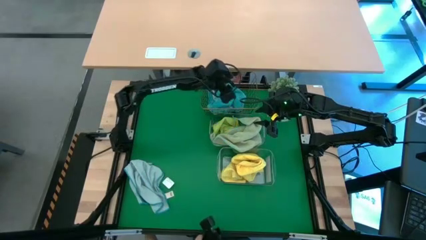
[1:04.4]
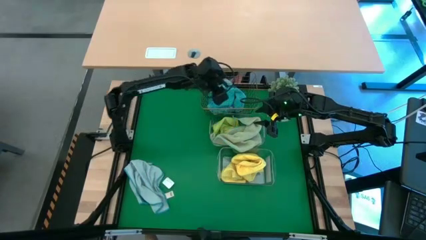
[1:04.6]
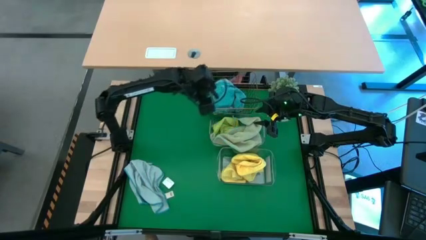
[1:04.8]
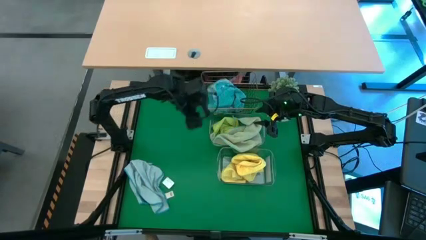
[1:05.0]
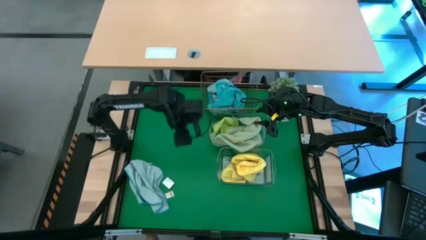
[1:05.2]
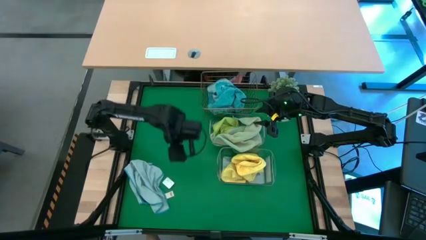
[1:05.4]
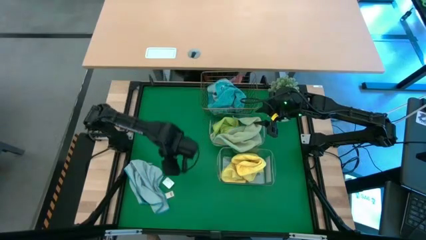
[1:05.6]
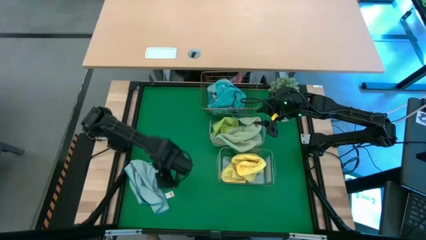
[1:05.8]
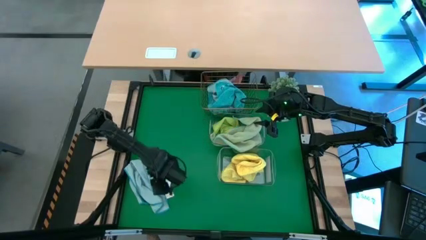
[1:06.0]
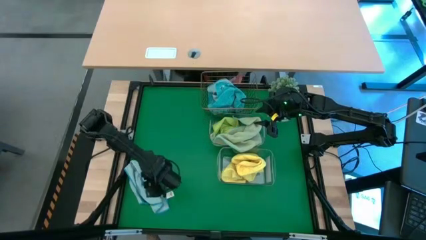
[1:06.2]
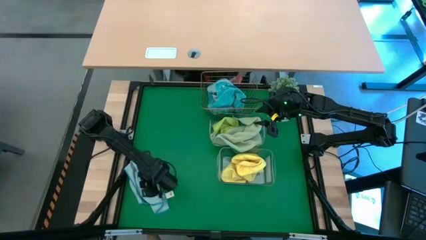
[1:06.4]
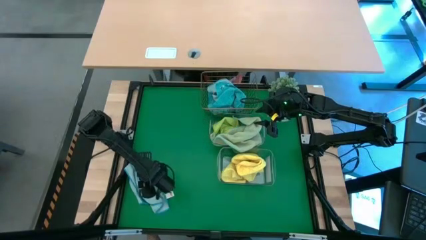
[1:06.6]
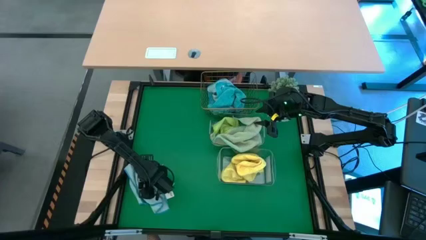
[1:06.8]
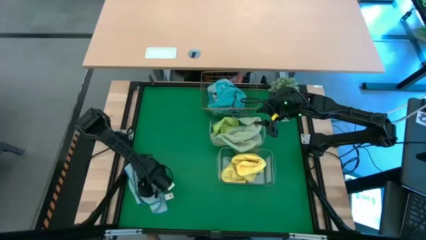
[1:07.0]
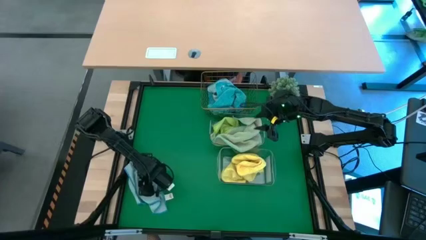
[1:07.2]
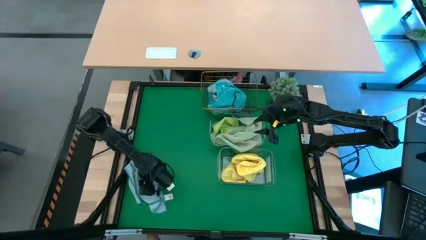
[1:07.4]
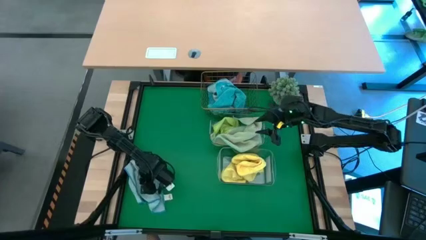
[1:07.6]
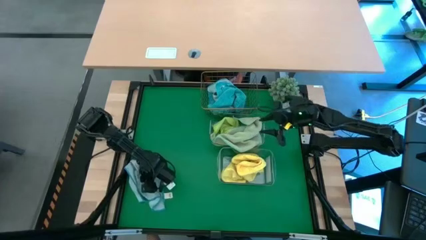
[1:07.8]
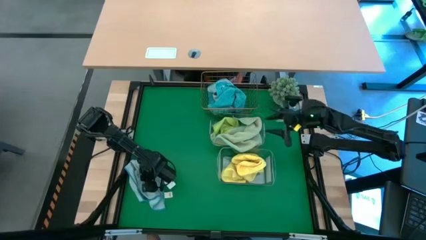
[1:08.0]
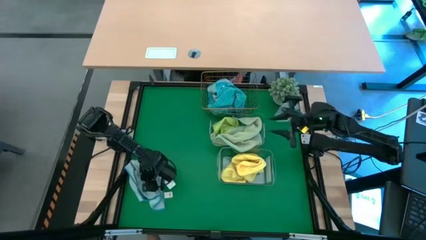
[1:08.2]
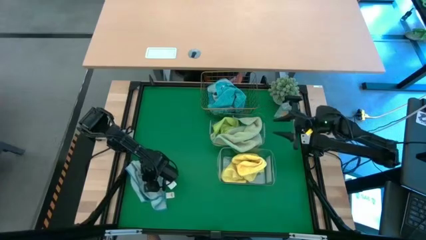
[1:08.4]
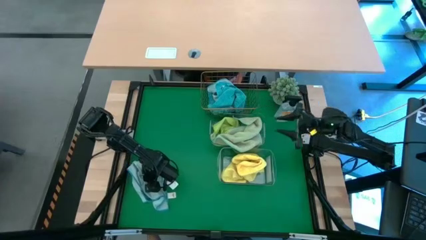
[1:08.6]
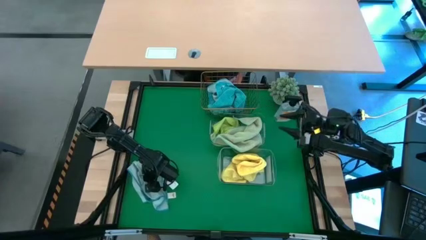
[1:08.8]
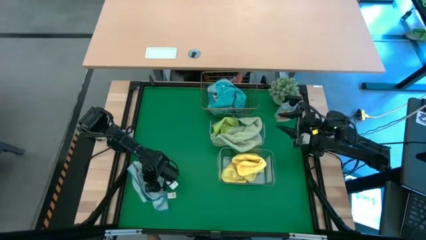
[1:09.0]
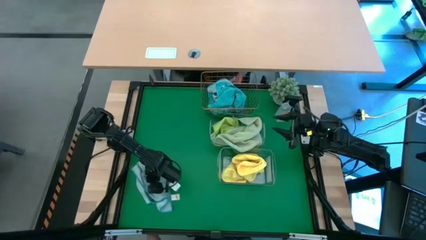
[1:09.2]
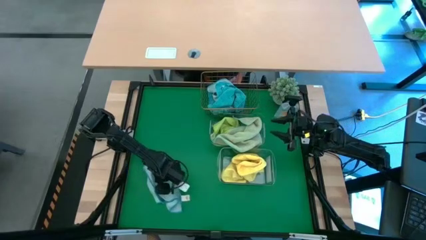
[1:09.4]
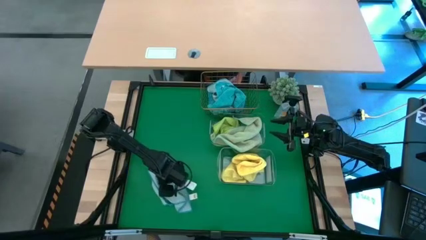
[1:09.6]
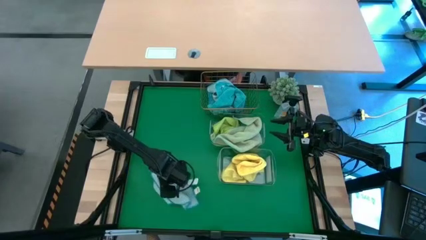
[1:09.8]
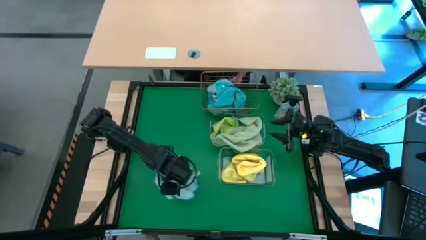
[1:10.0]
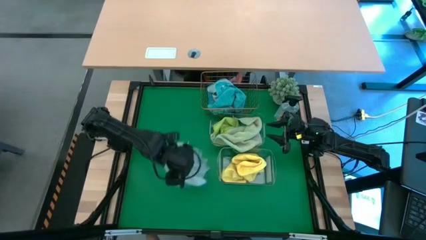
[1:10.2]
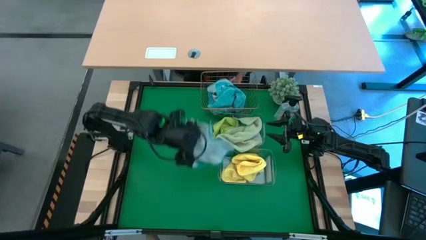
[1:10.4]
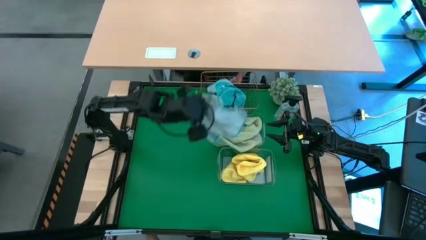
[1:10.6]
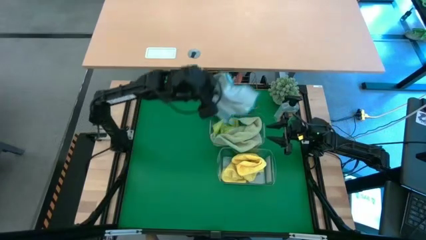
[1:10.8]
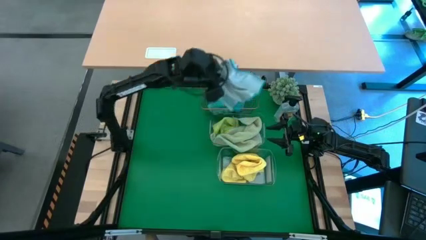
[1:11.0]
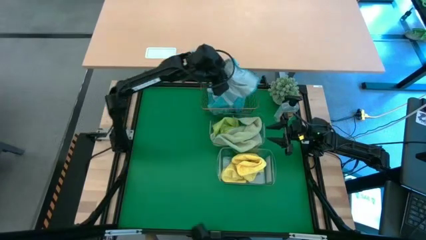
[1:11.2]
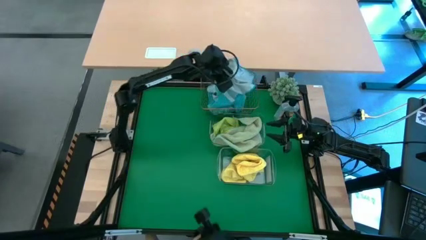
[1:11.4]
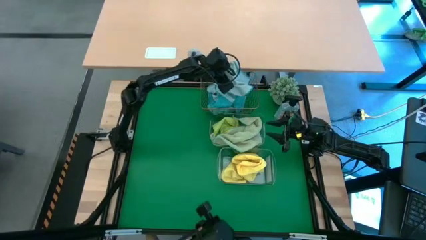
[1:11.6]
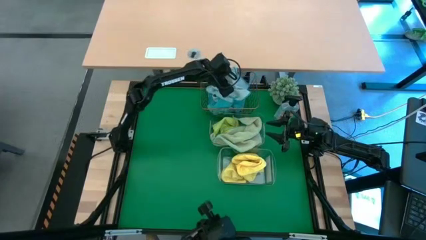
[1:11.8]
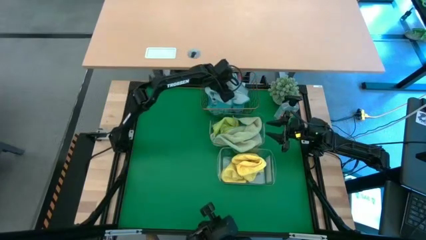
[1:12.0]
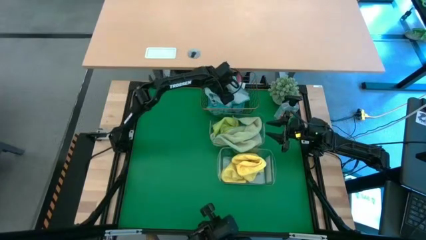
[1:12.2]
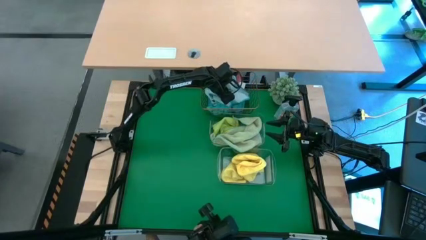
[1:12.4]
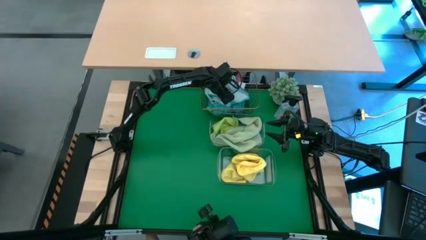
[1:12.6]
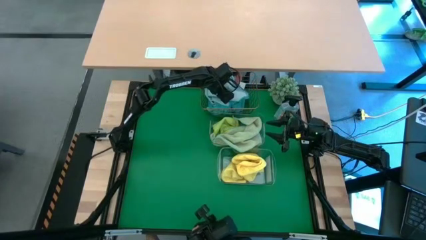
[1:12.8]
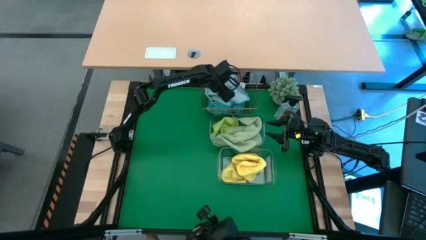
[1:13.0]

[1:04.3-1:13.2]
Task: Sort microfiber towel by color & place in baskets
Put the light blue microfiber towel into the wire basket

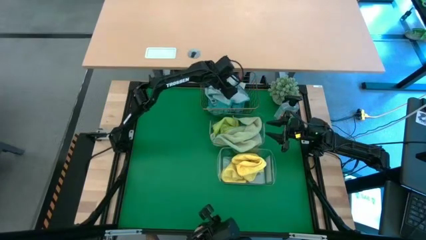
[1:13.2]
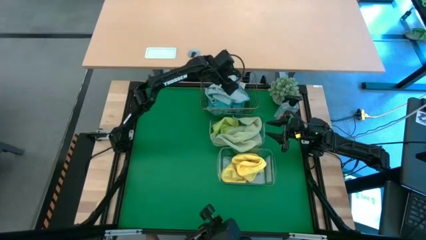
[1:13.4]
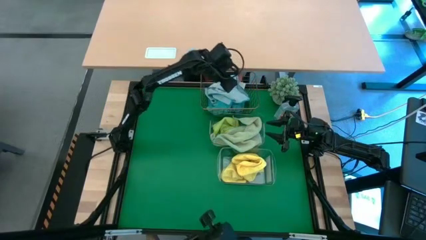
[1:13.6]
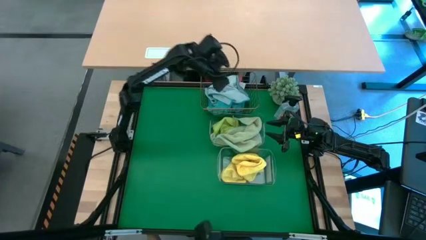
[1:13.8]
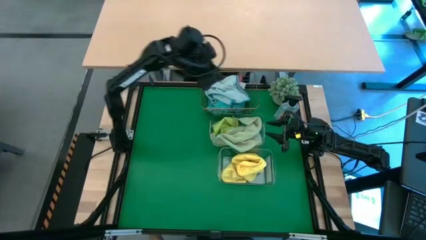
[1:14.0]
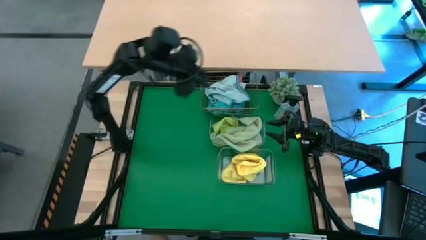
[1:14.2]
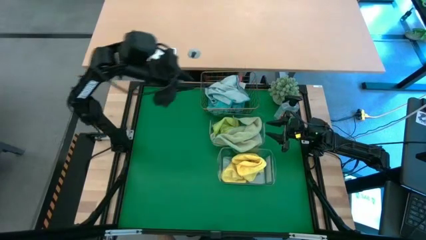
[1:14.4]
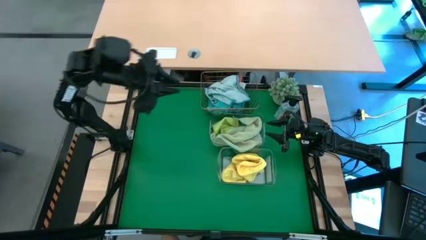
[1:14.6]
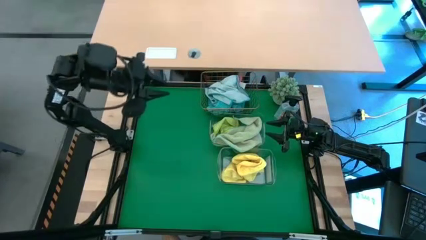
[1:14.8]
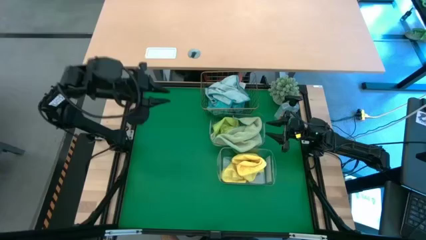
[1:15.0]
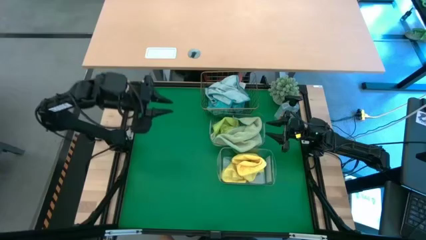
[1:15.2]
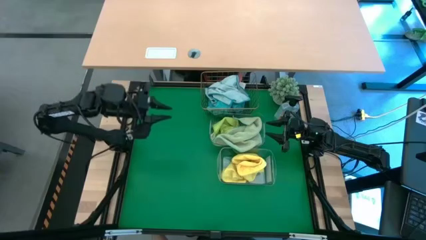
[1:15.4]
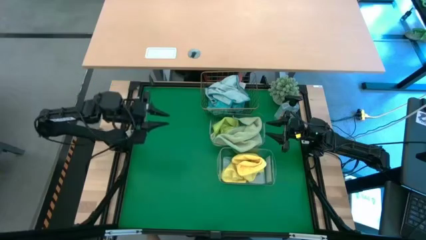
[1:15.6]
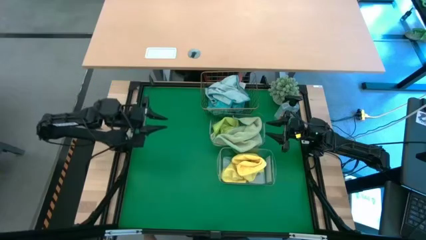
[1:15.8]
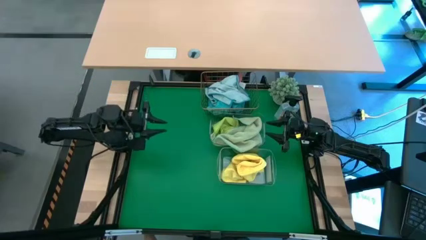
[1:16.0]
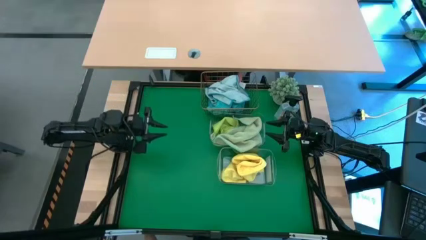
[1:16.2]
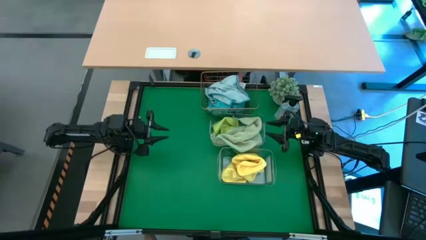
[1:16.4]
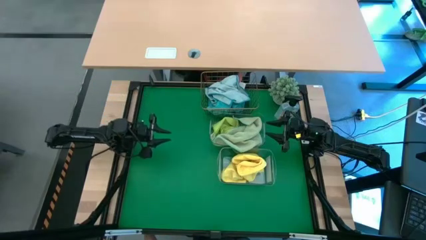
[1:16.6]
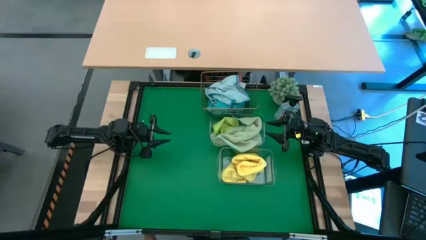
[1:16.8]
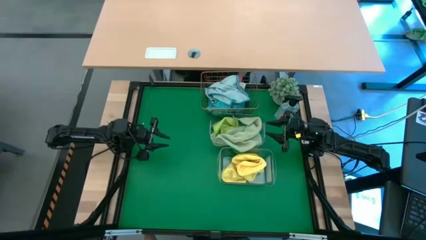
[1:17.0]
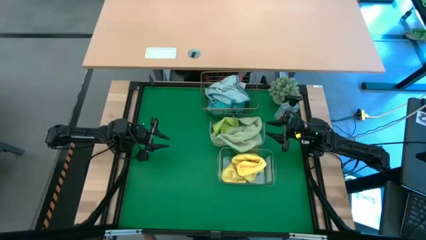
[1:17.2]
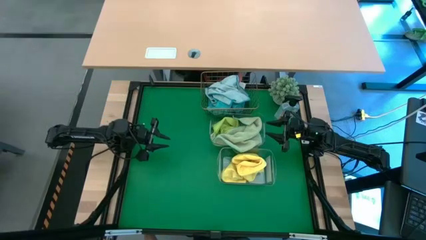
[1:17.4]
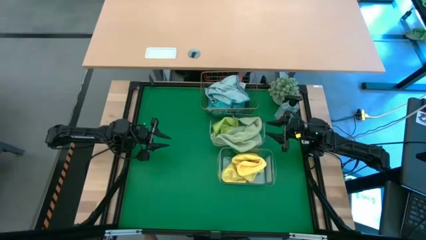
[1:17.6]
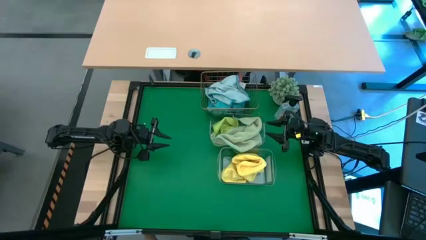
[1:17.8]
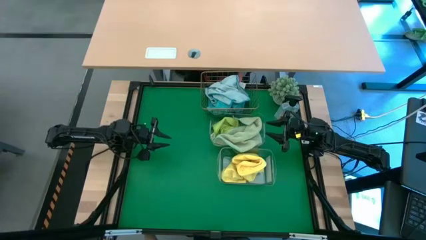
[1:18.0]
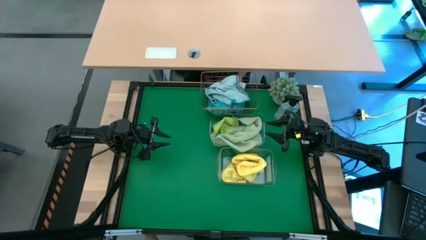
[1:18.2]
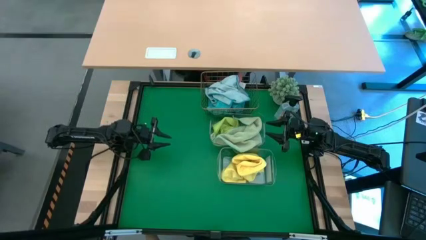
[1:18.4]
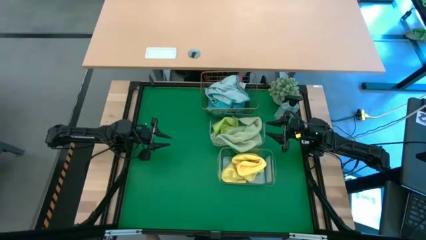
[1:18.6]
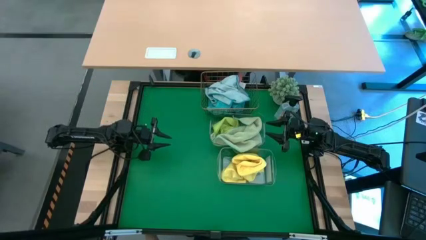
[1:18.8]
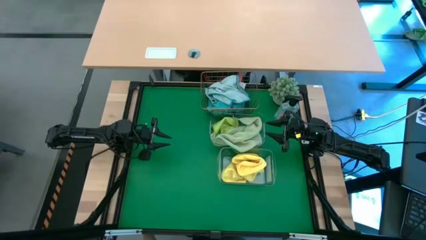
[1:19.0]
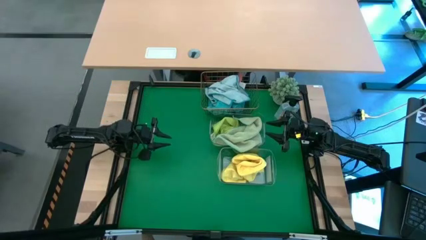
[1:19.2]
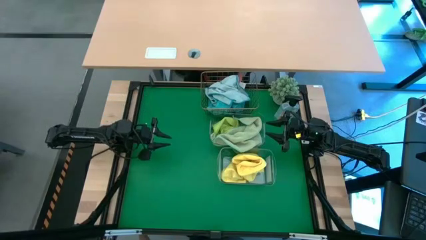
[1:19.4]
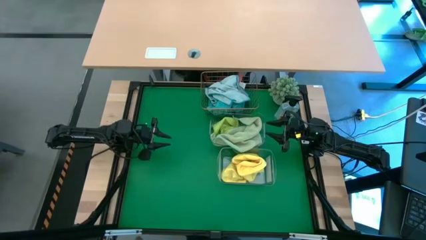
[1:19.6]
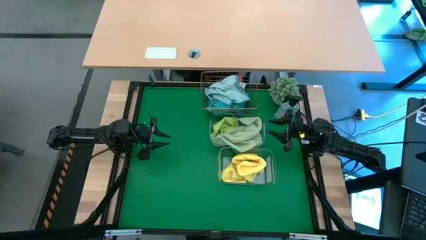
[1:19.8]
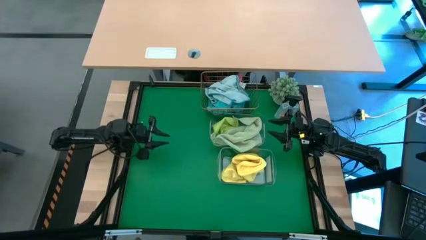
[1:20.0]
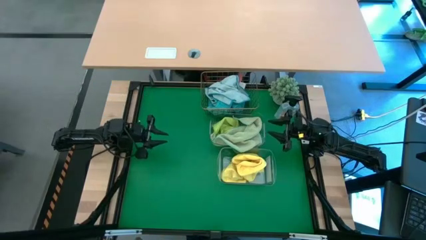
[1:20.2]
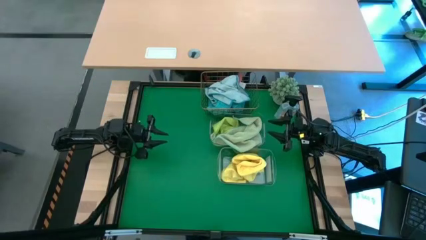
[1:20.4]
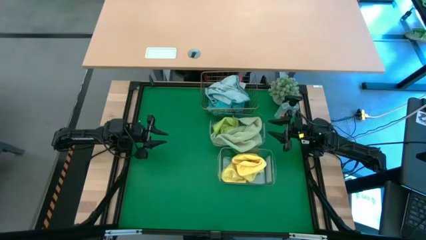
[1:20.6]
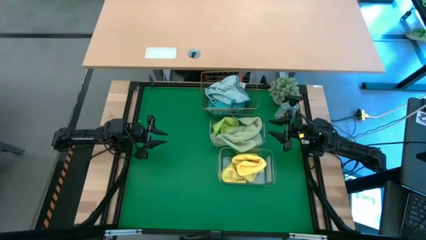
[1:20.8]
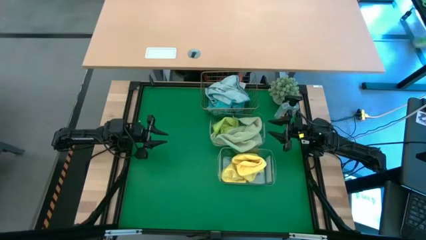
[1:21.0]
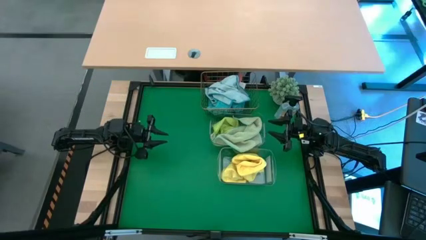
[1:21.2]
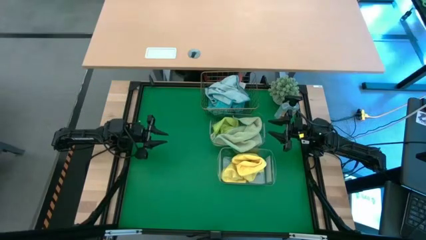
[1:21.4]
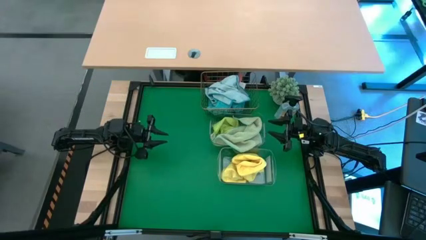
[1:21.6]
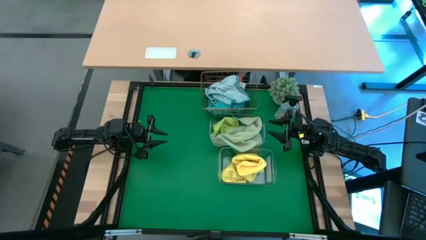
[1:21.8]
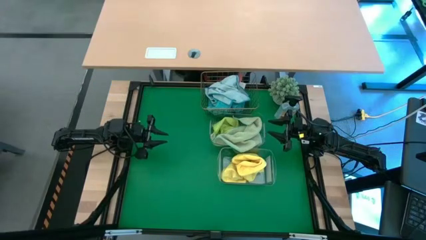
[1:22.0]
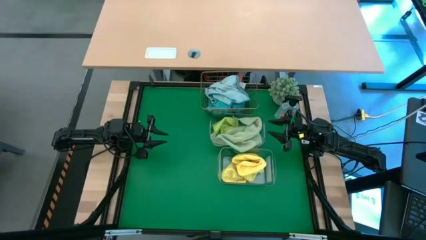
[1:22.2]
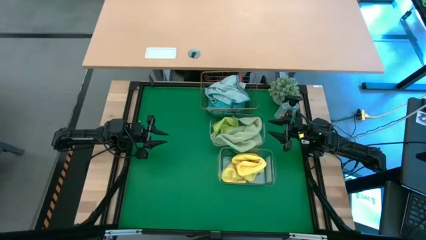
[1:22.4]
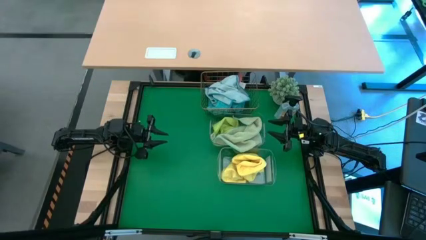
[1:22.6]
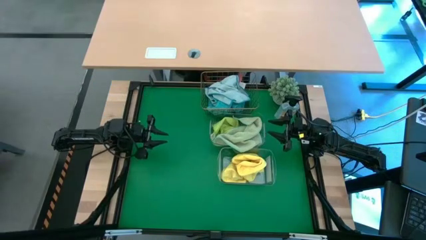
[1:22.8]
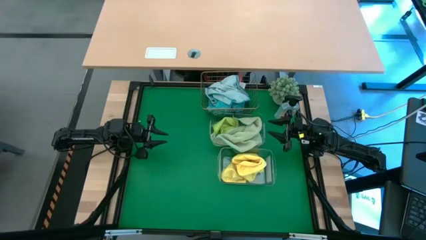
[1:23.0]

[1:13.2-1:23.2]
Return to Home Position
